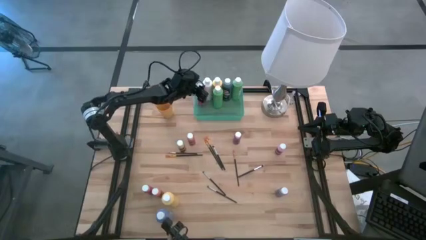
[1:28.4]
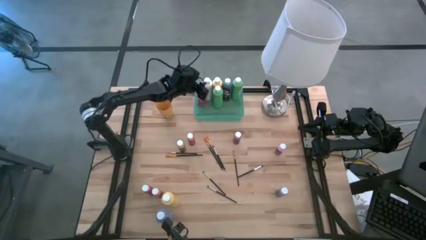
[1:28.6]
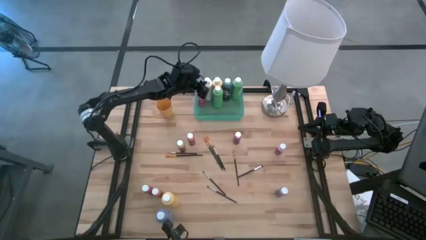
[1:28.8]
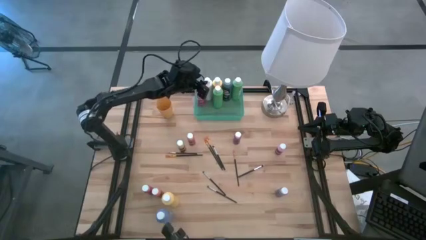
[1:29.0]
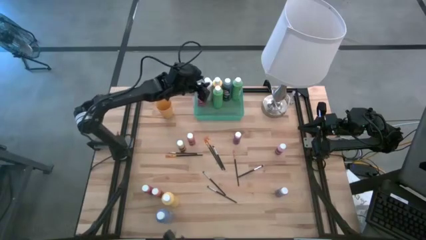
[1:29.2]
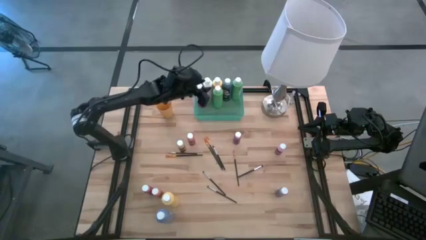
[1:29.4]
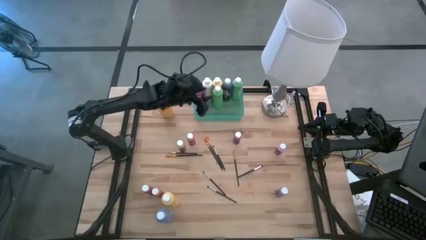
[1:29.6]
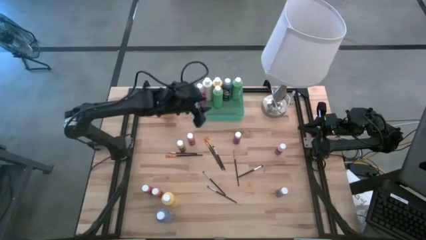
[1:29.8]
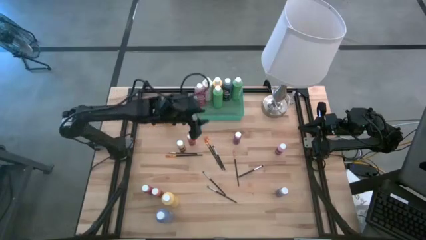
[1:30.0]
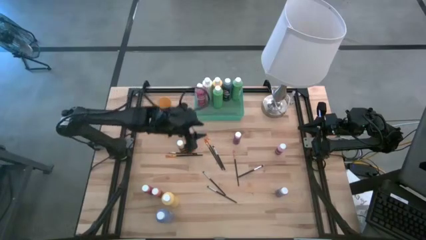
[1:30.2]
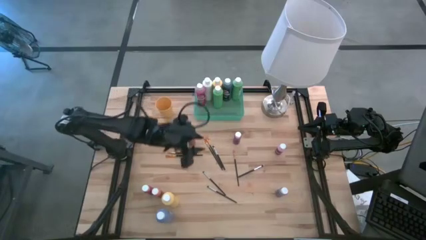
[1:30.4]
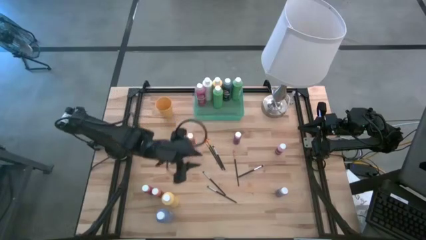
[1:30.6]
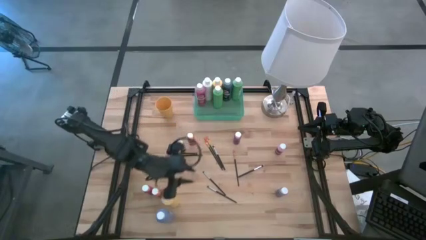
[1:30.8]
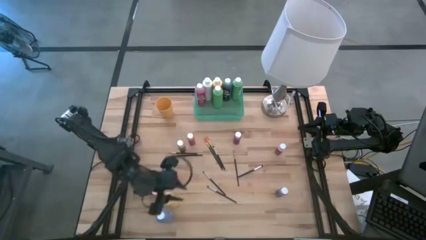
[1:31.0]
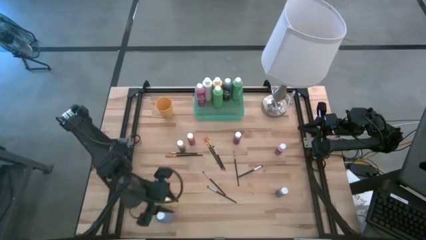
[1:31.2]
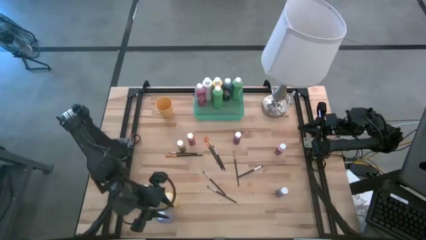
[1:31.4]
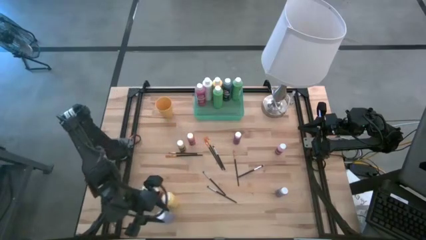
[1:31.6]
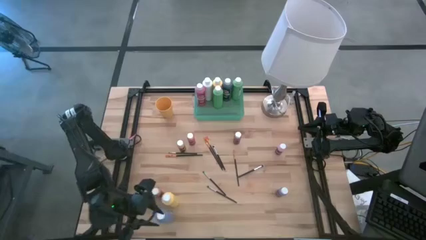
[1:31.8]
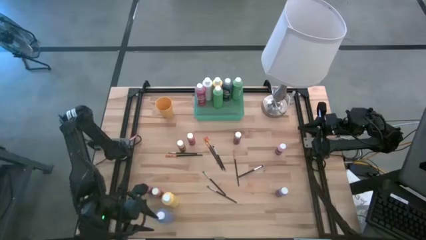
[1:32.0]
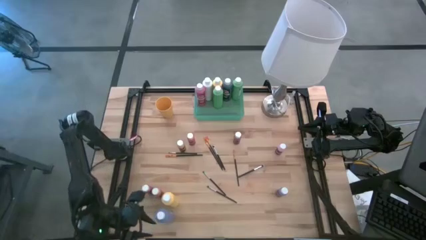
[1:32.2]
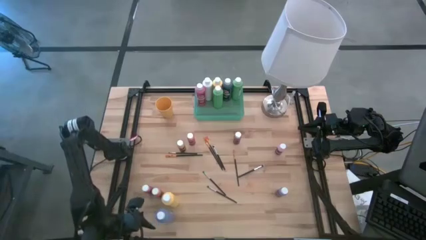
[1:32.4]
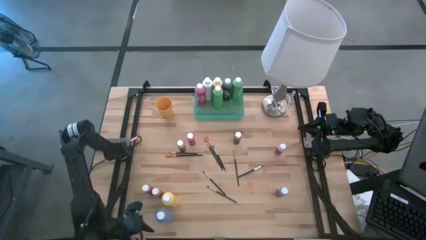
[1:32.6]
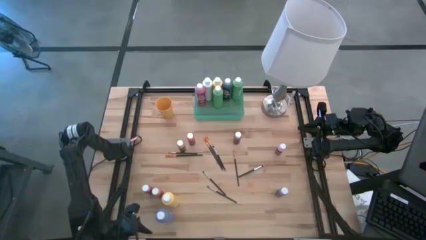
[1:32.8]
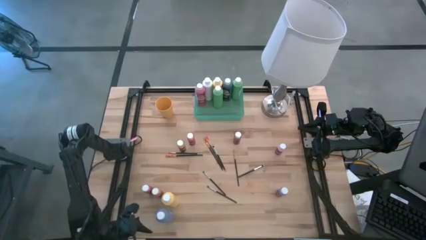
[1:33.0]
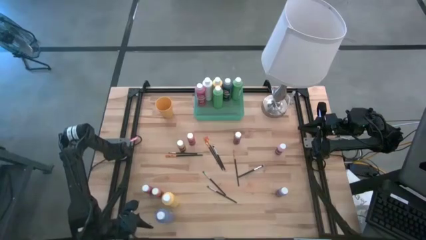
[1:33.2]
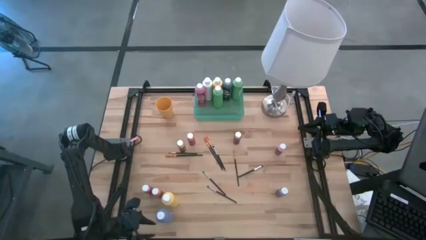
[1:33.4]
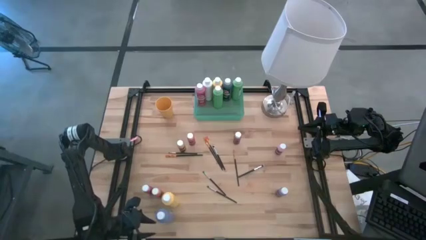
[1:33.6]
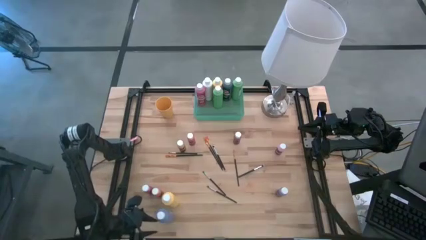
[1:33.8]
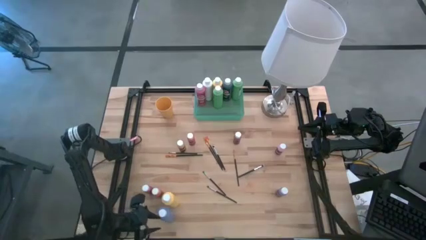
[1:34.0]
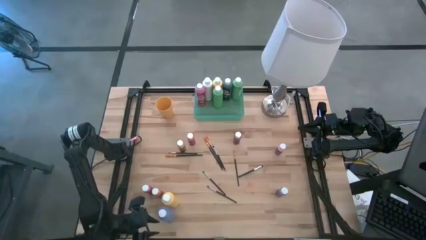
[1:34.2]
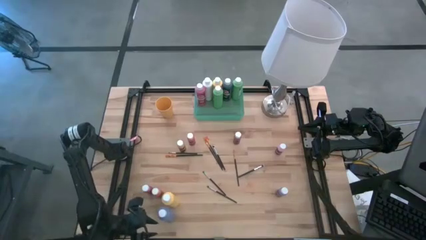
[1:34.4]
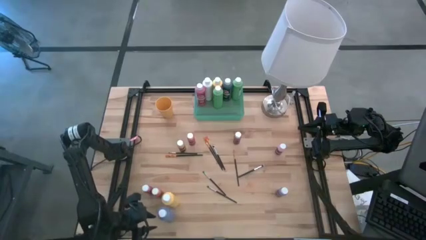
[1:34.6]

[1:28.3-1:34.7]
Task: Pick & Place Paint Supplies
Put the large purple paint bottle into the green bin

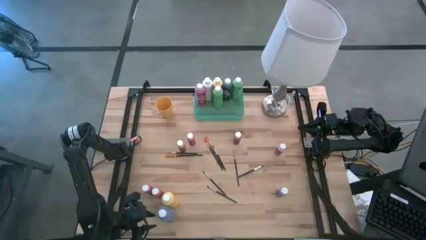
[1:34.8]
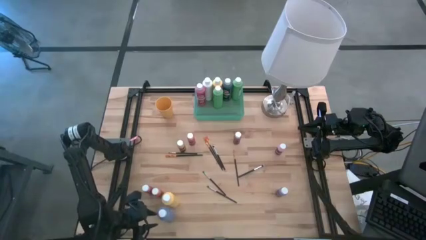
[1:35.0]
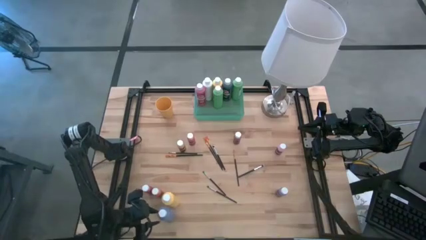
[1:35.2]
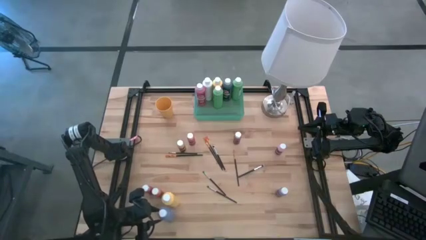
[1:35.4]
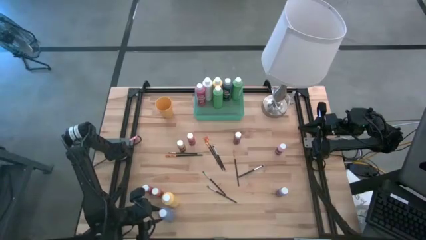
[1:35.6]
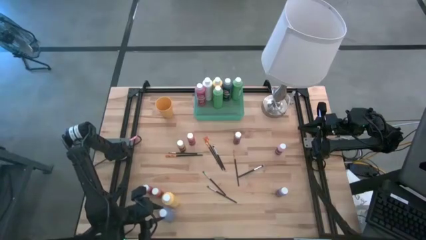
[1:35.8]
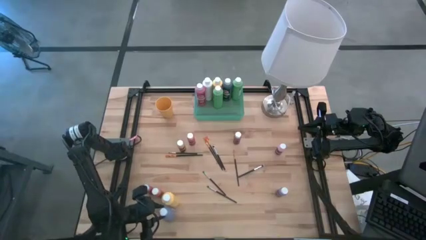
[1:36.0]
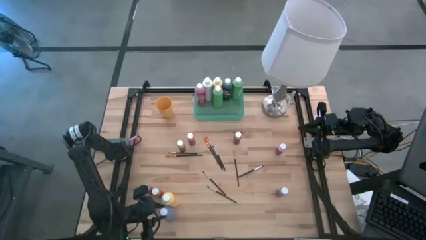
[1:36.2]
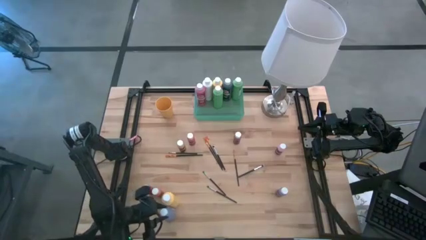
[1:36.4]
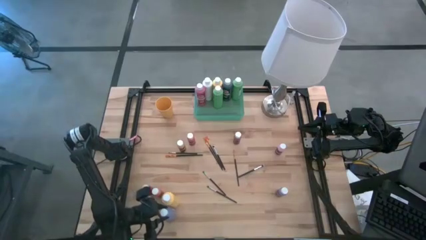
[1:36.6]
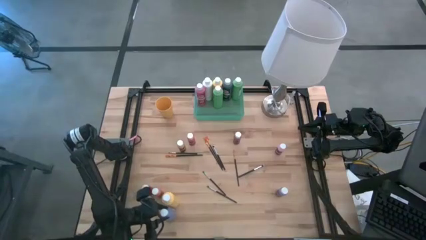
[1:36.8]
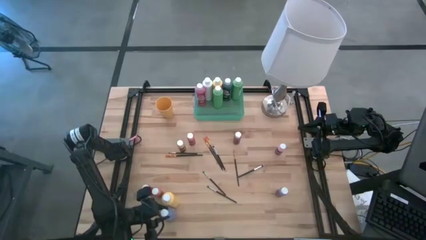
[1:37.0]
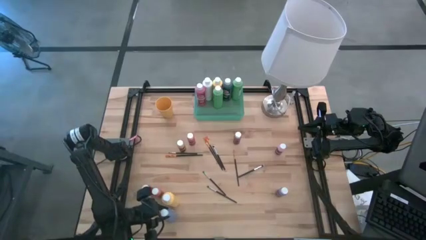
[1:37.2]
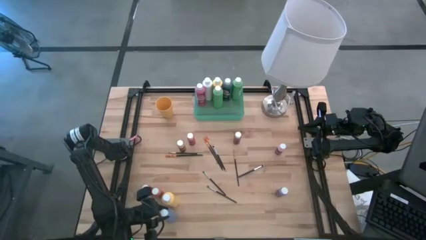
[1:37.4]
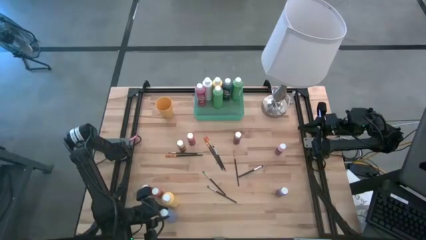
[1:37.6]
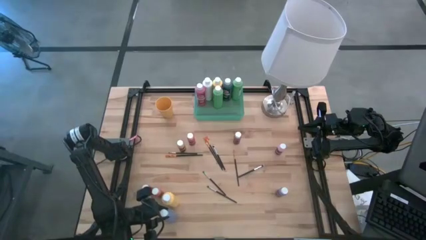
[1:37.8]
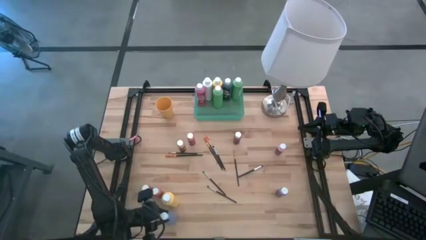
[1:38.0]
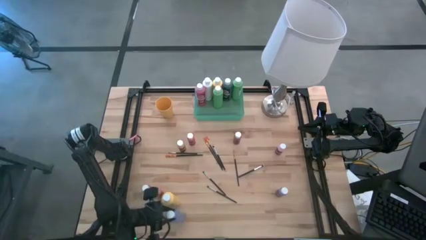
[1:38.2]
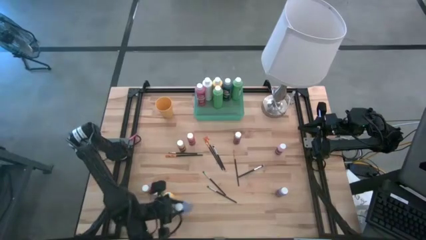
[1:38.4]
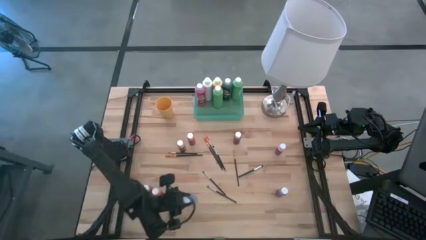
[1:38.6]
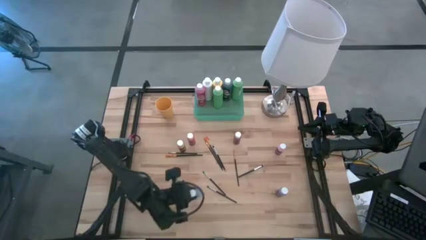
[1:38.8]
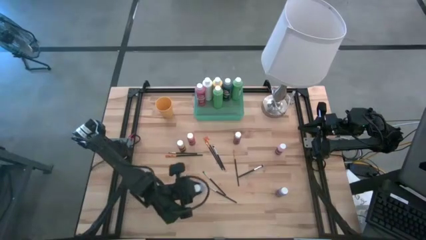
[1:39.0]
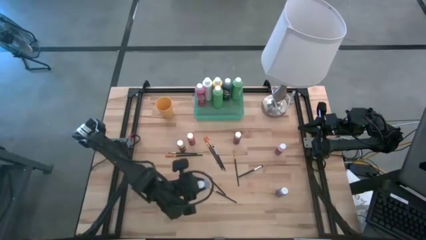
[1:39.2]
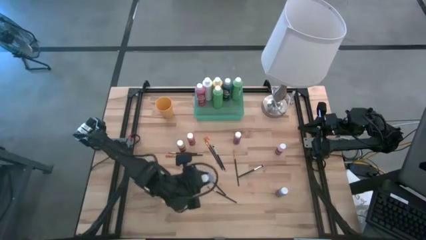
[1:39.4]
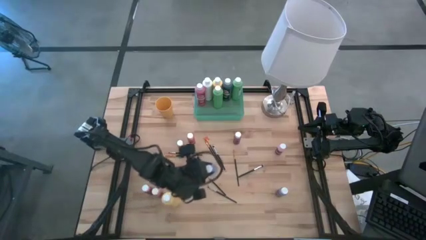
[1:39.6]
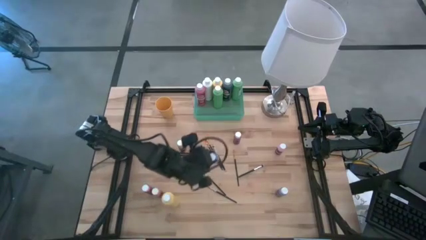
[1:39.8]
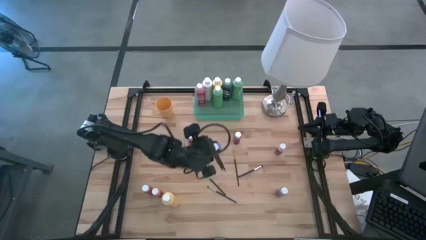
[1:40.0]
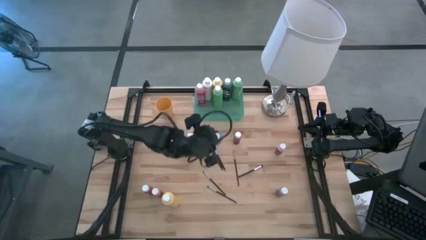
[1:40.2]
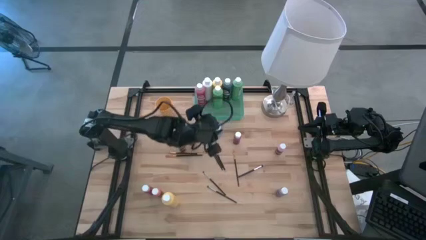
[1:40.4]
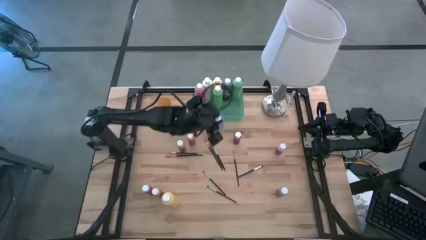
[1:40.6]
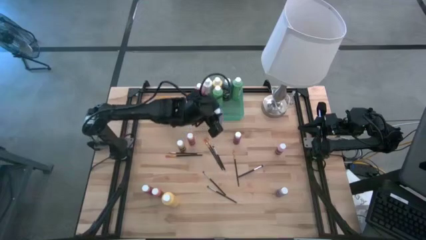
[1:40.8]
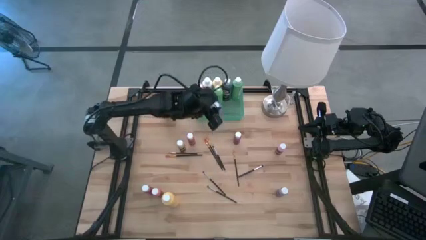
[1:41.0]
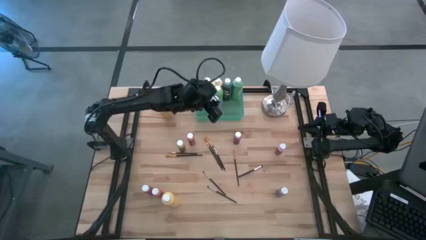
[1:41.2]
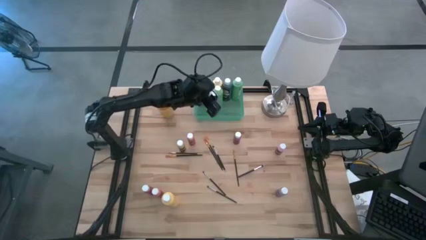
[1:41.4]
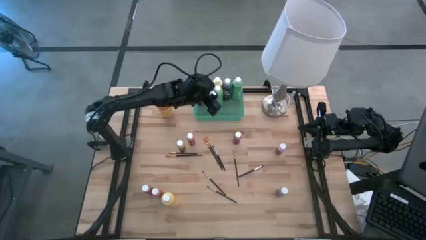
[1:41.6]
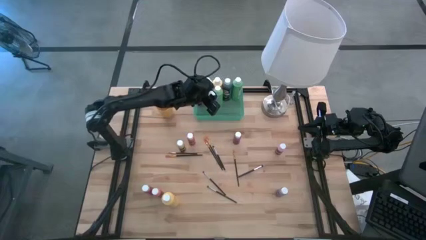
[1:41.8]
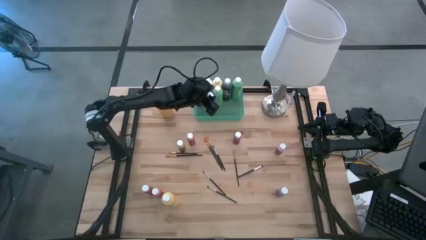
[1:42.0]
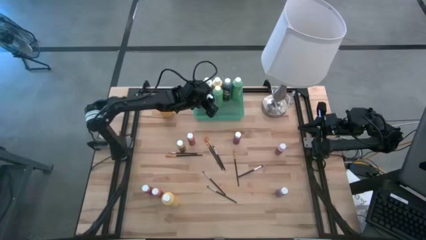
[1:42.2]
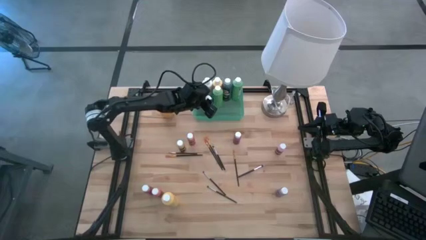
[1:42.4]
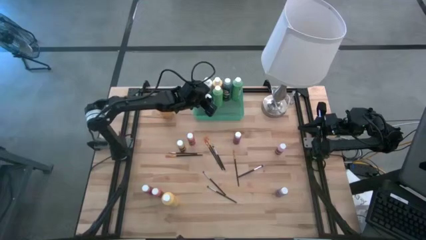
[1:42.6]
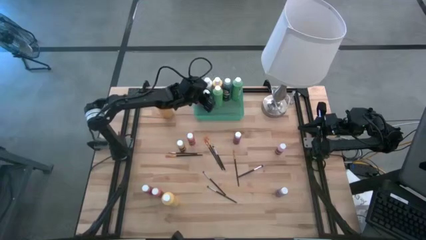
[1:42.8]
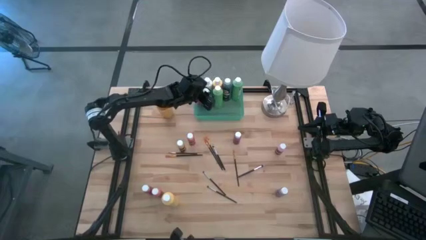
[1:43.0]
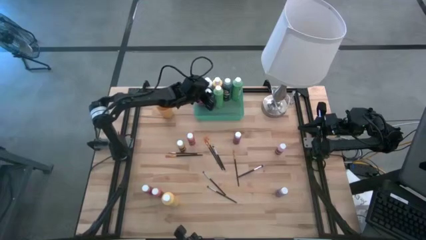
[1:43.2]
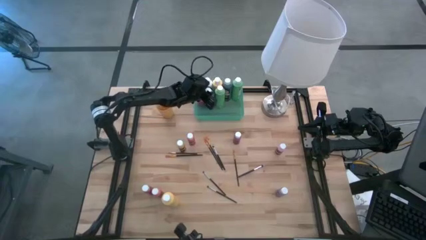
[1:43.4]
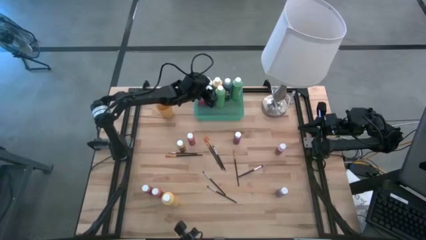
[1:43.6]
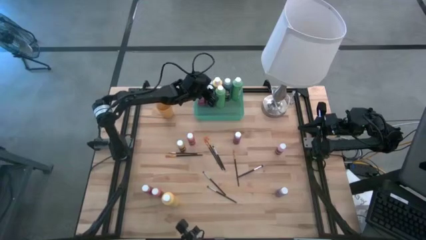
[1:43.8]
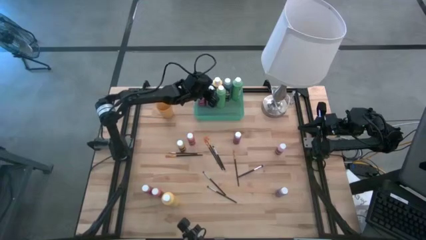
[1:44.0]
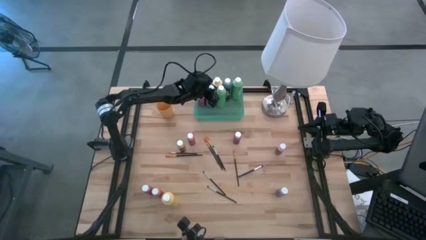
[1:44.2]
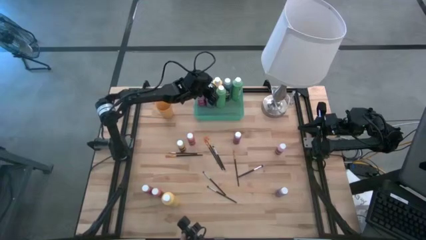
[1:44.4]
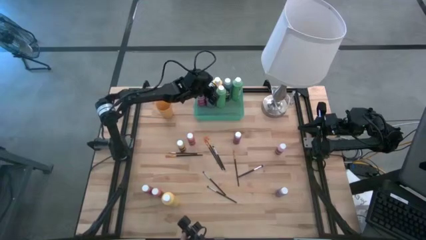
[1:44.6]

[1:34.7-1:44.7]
Put the large purple paint bottle into the green bin
